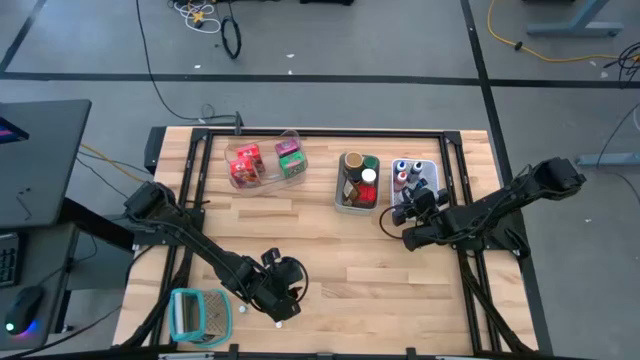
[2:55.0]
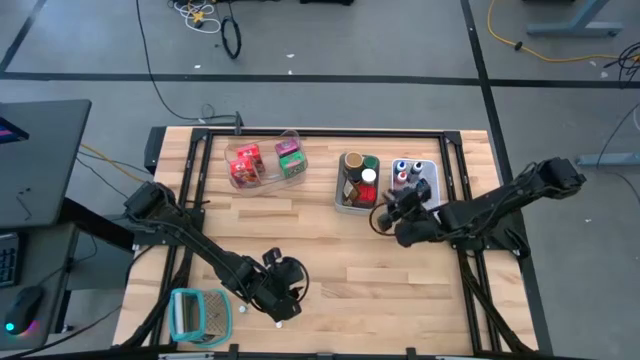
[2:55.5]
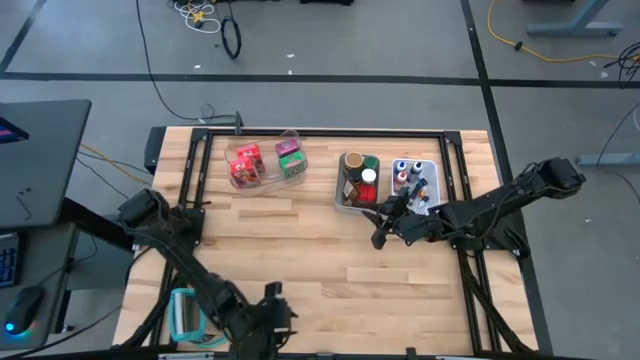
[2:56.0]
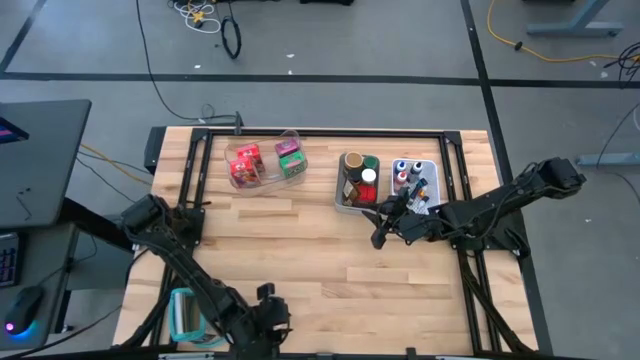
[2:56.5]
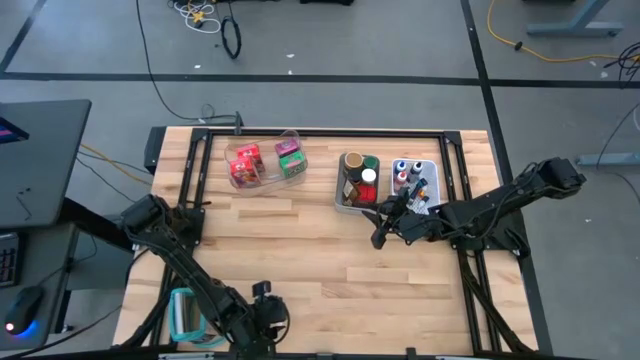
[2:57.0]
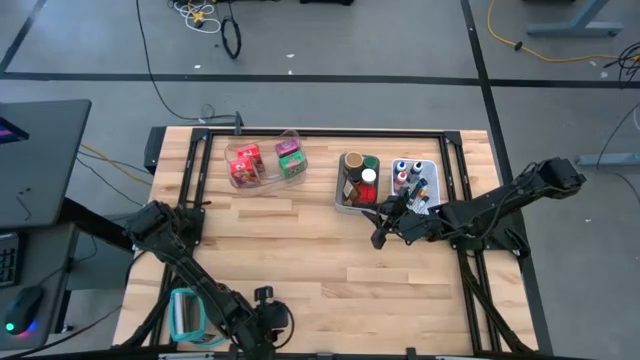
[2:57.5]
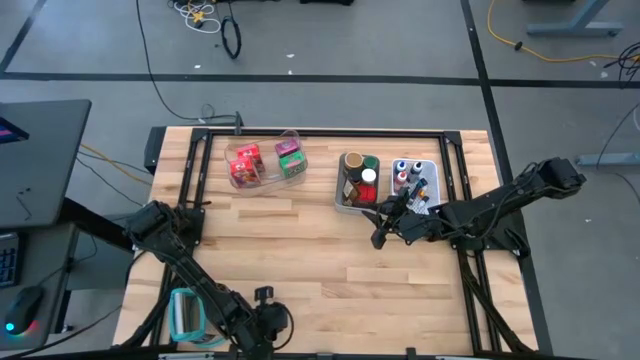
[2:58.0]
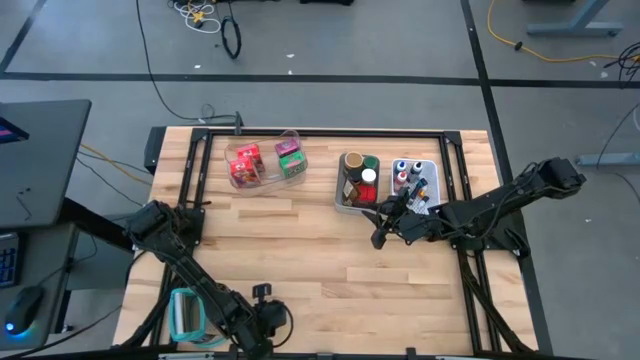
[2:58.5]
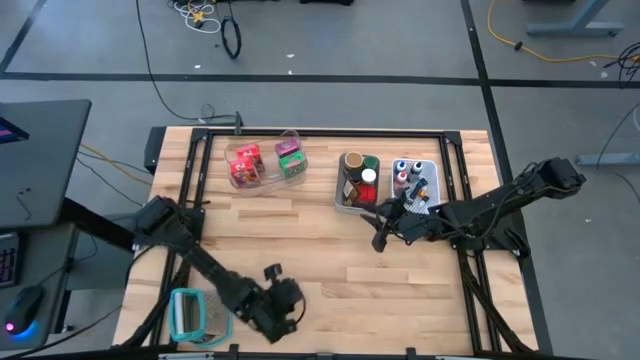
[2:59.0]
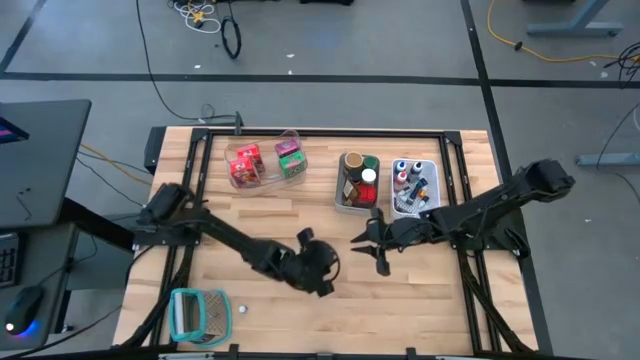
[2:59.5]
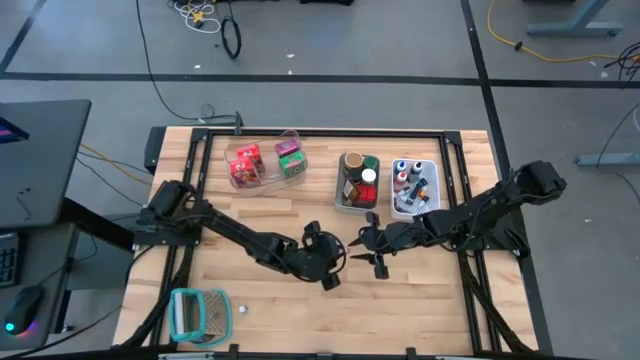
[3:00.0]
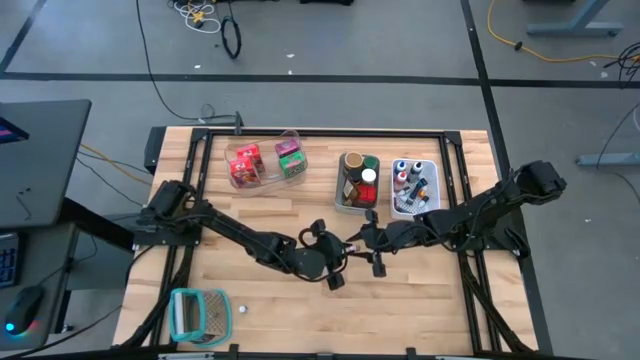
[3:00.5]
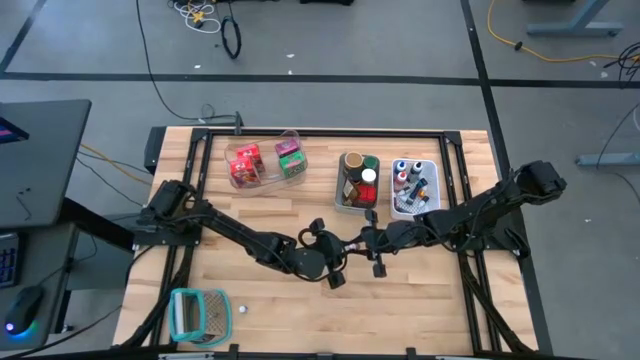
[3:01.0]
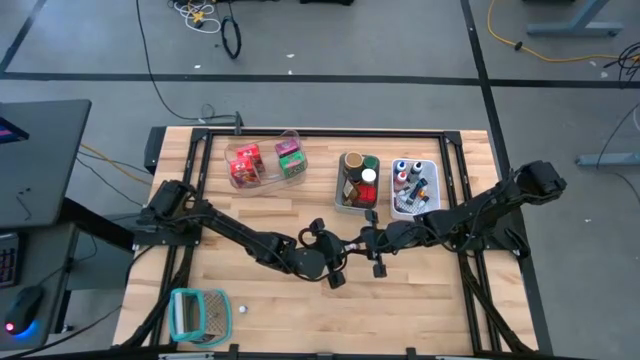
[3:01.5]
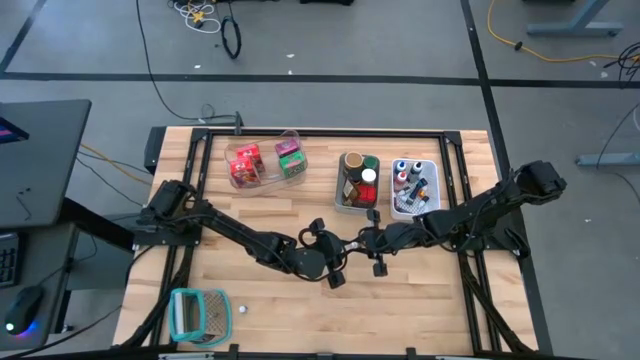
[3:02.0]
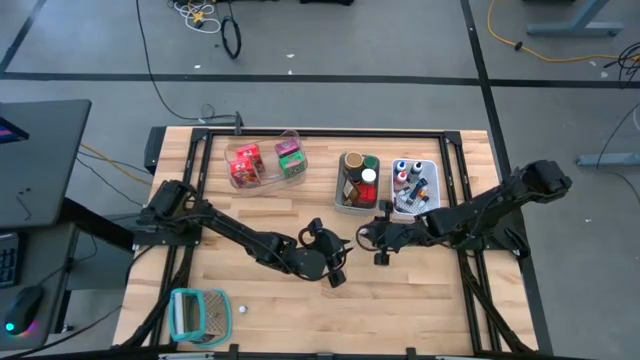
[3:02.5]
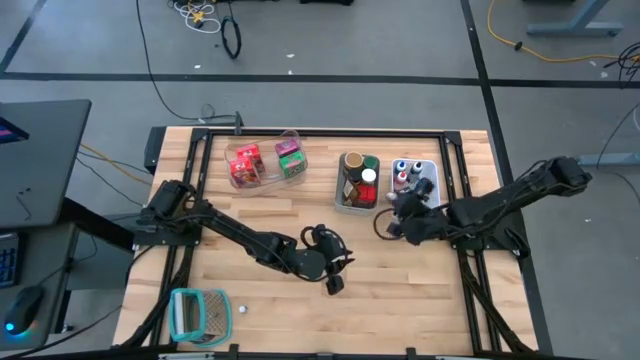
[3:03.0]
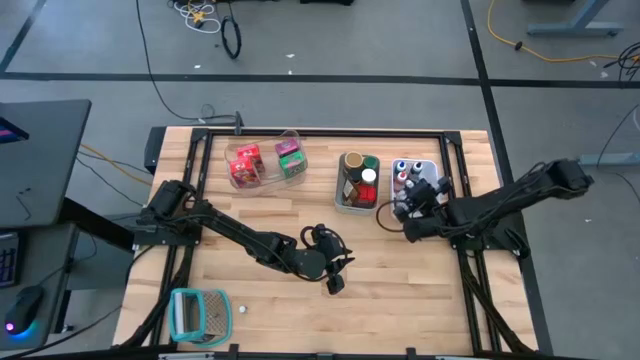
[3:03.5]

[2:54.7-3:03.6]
Task: Pick & Place Kitchen Items
Put the small yellow food coloring bottle into the white bin

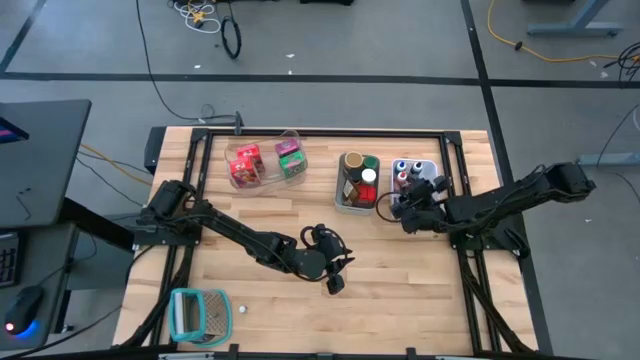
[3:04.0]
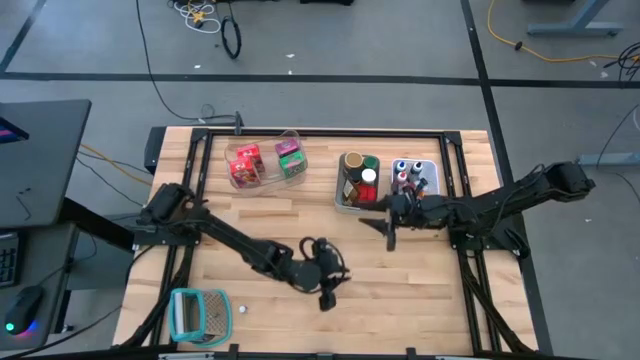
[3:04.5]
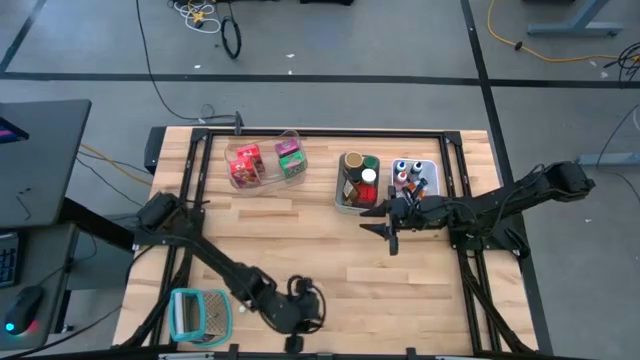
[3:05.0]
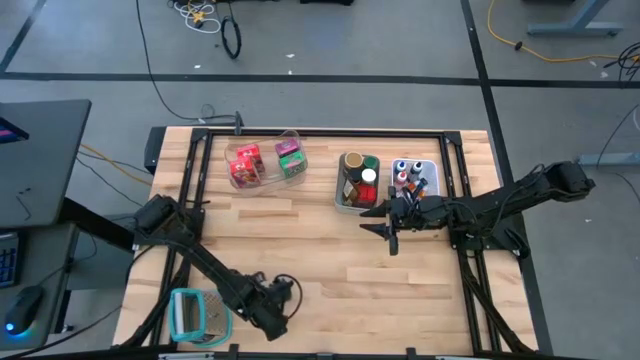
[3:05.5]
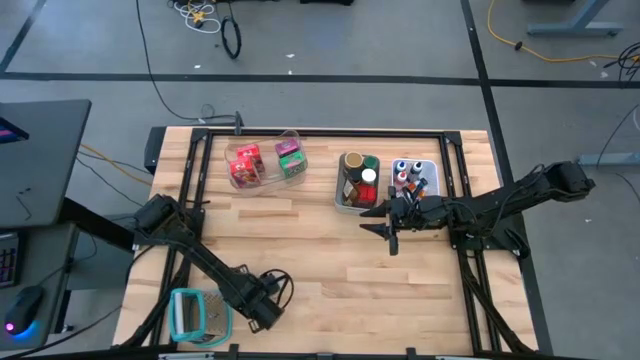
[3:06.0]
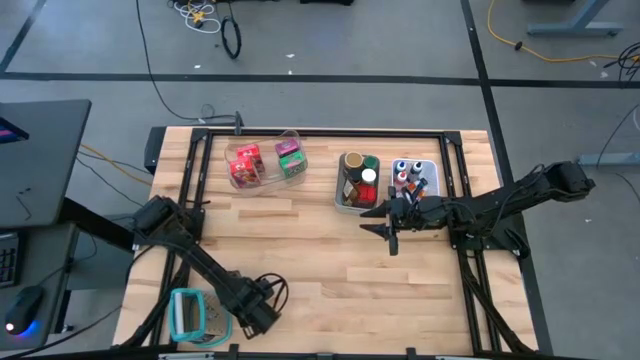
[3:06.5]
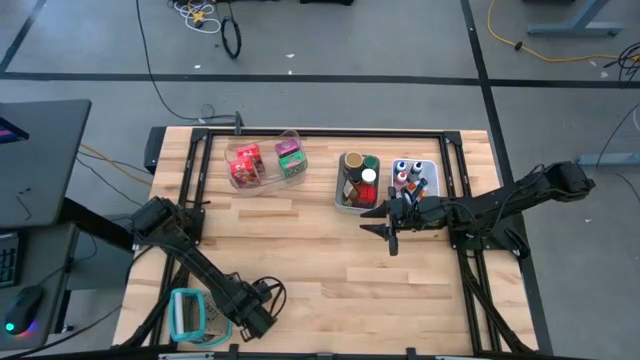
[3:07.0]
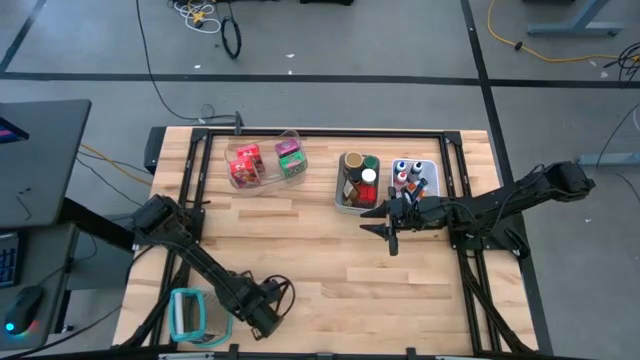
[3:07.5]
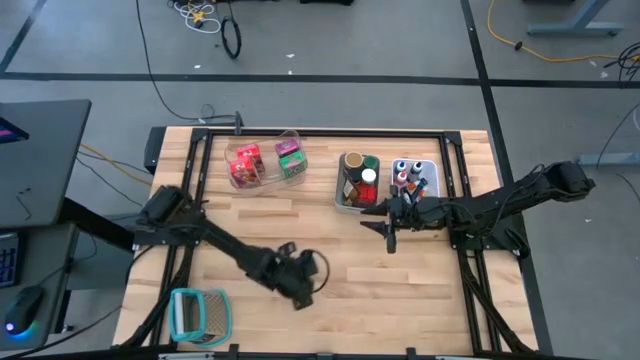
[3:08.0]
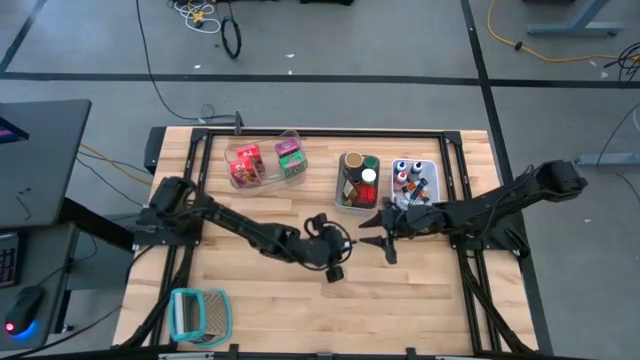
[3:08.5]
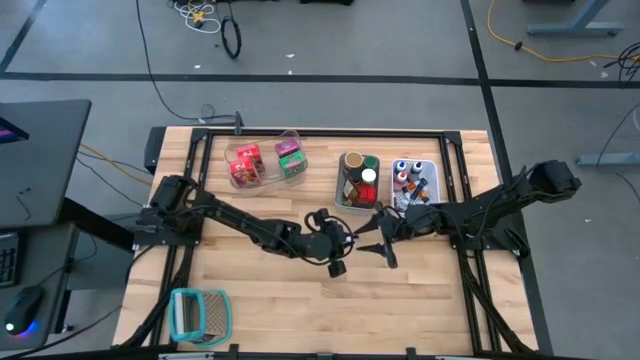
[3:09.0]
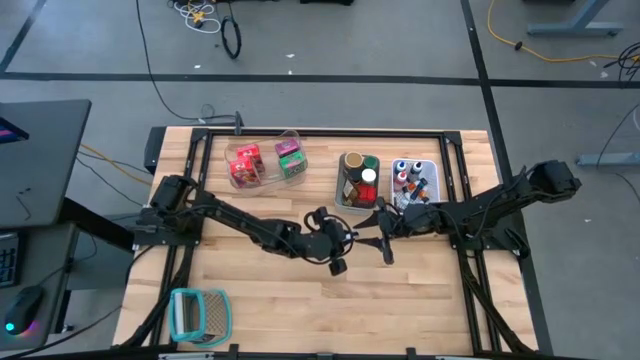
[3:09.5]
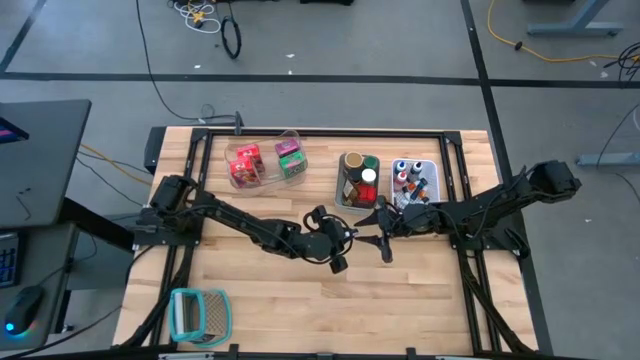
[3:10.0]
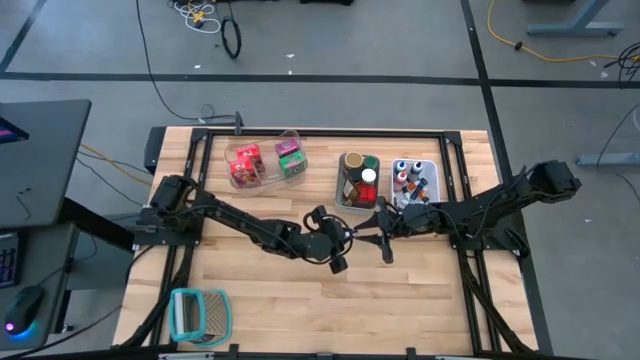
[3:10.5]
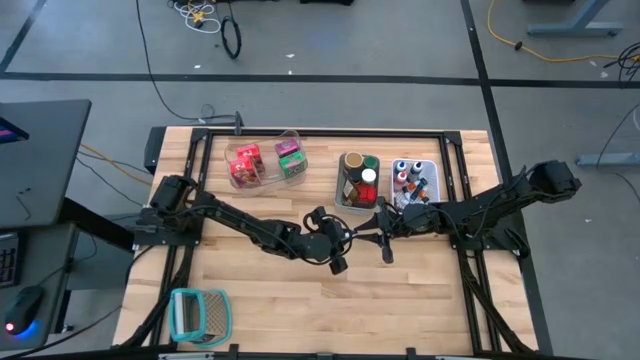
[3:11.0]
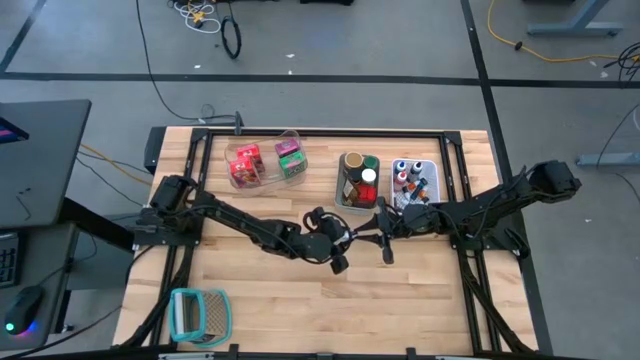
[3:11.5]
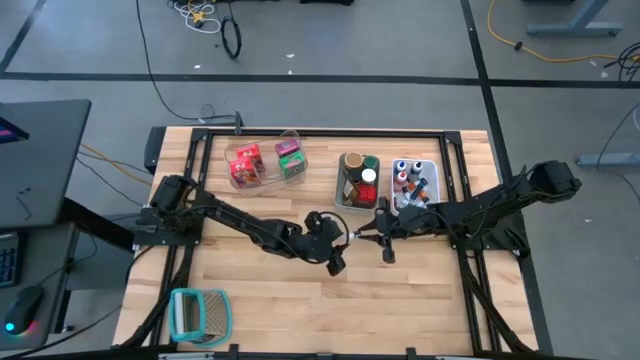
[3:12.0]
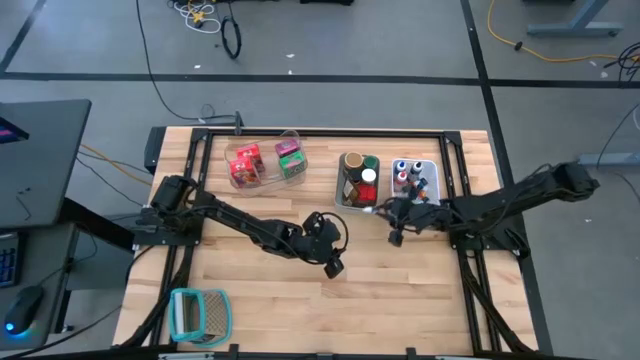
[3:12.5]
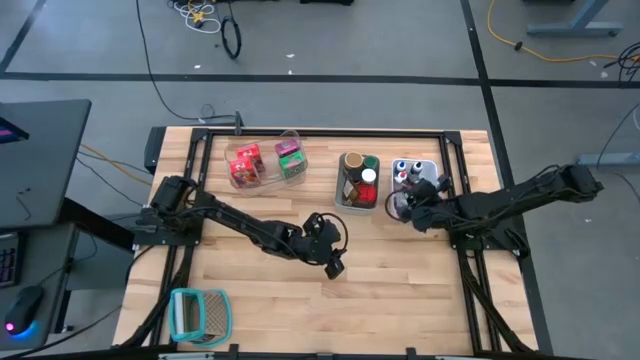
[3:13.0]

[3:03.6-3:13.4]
Put the small black food coloring bottle into the white bin

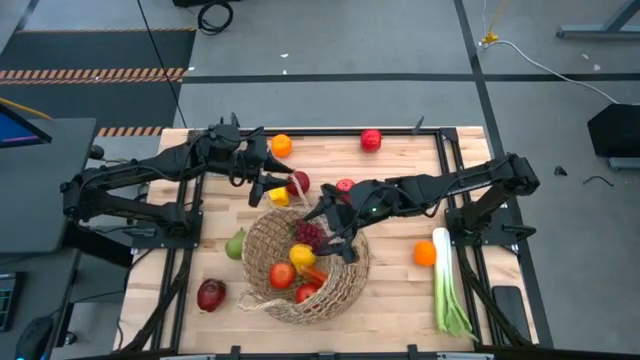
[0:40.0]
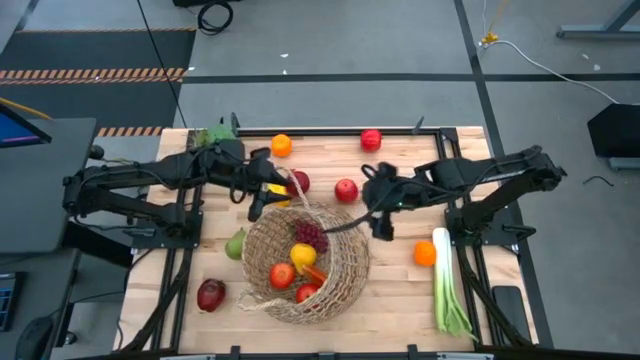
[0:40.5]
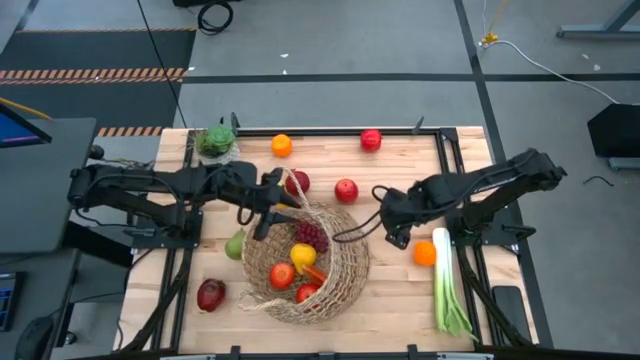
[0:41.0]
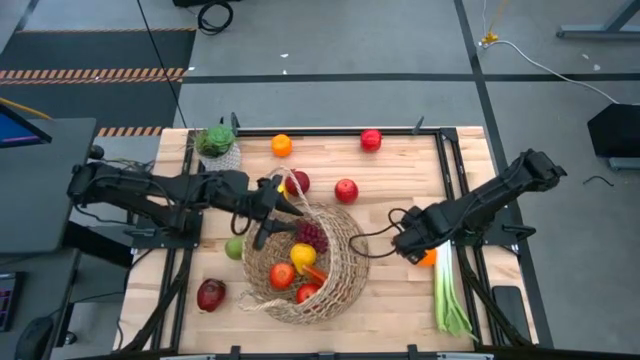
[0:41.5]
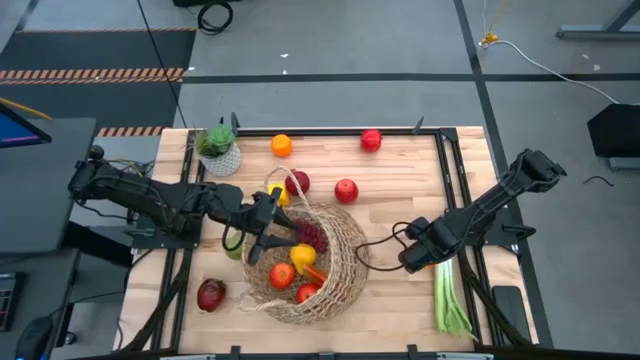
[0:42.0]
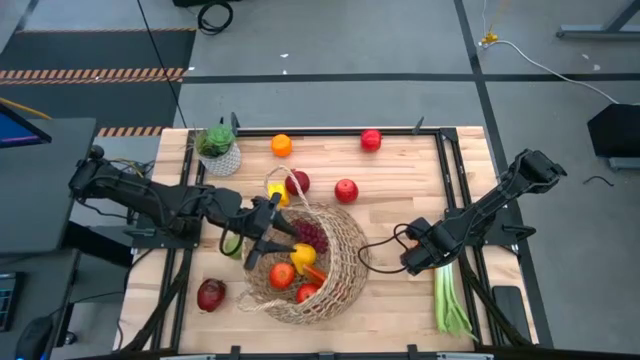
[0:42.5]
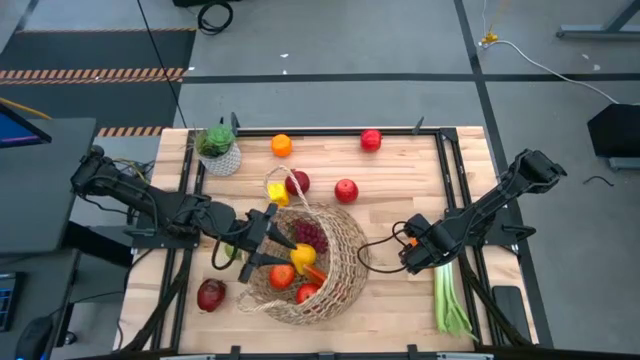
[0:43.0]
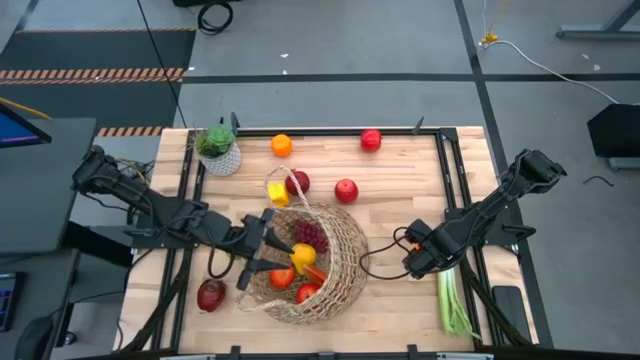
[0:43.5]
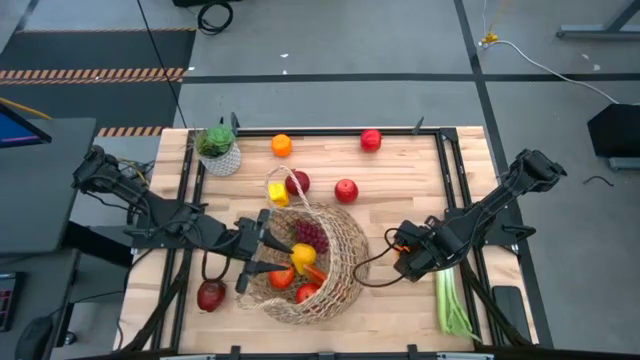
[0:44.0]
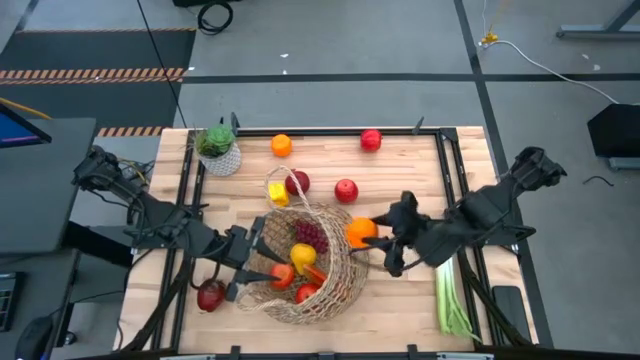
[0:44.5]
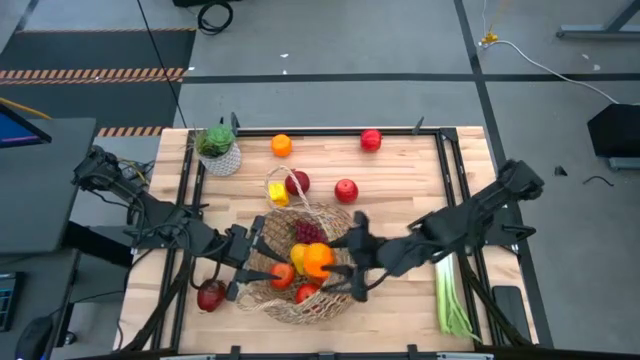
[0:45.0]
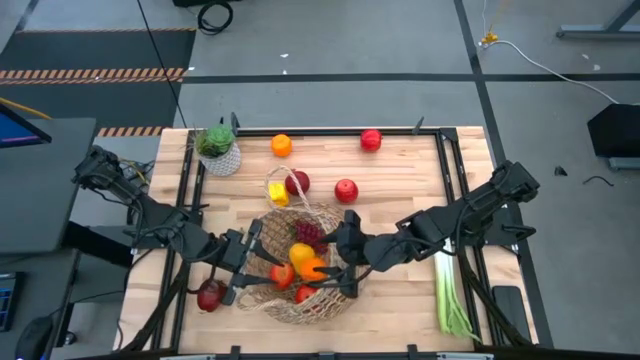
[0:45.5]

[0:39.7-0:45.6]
Task: Build produce basket
Put the right orange into the basket
